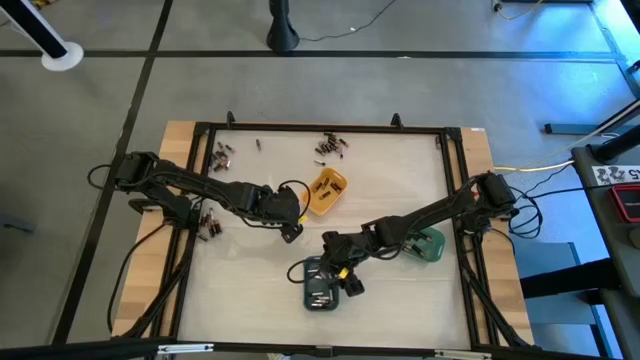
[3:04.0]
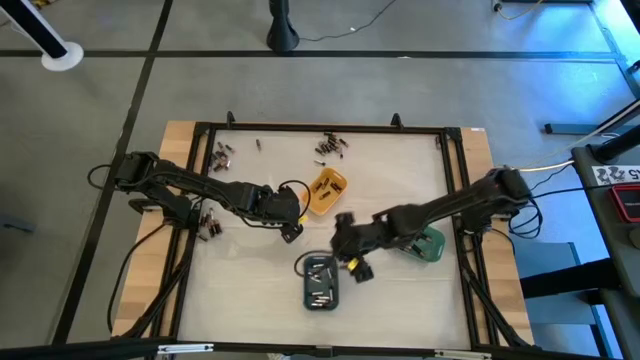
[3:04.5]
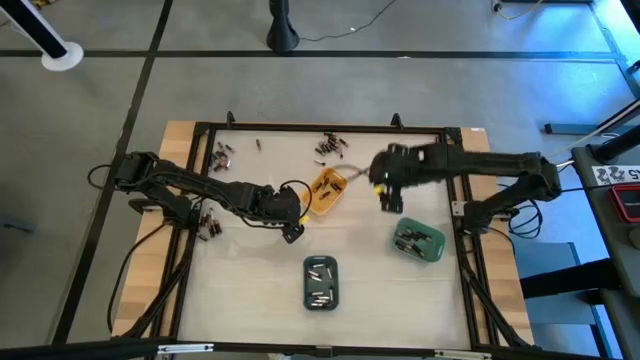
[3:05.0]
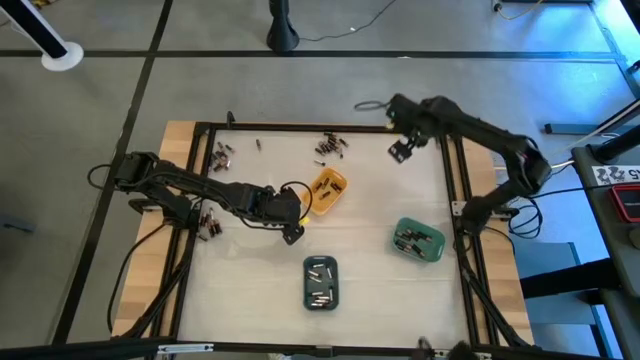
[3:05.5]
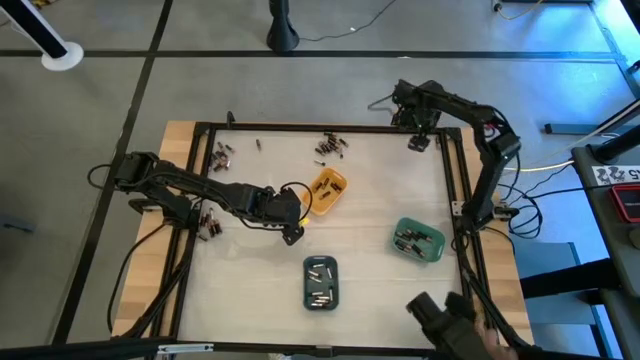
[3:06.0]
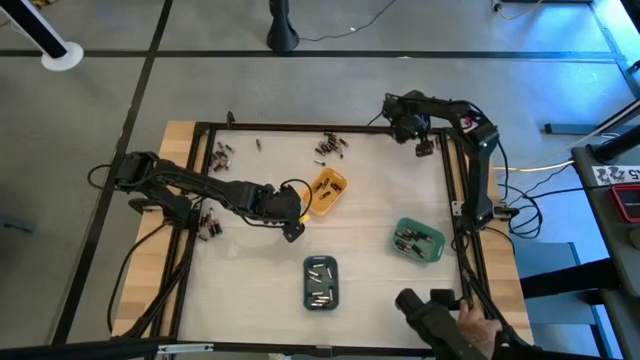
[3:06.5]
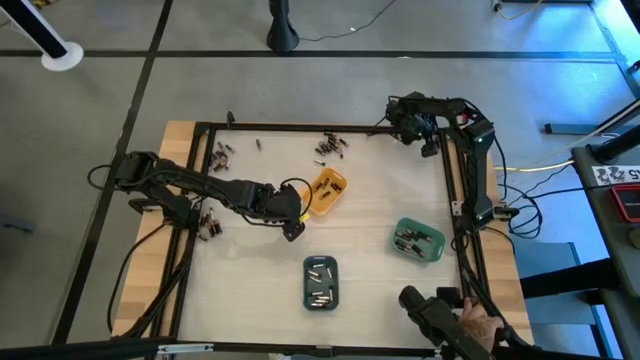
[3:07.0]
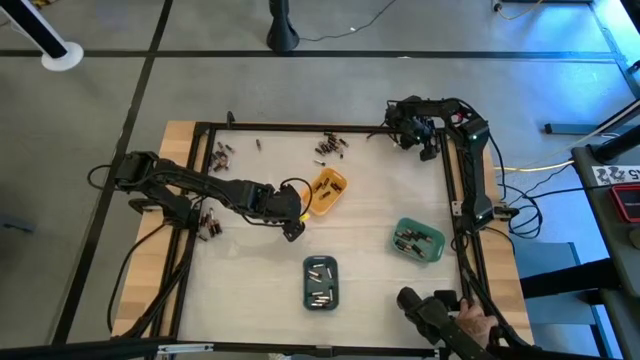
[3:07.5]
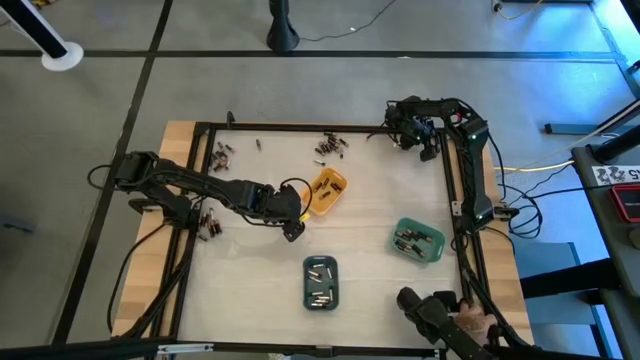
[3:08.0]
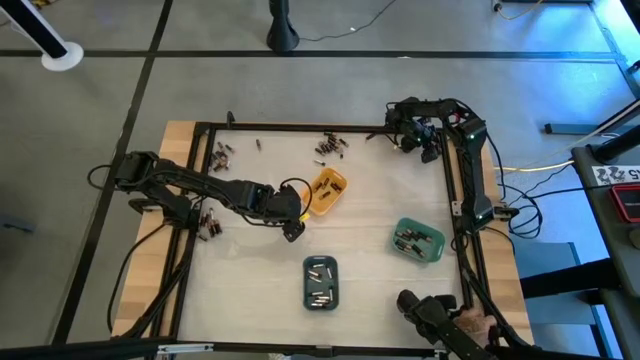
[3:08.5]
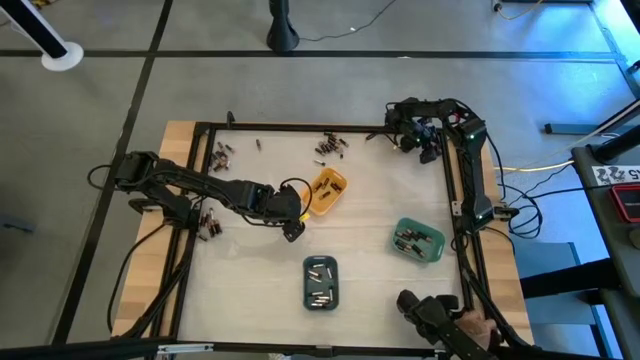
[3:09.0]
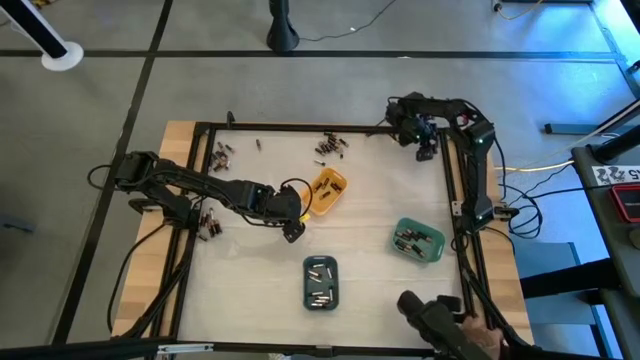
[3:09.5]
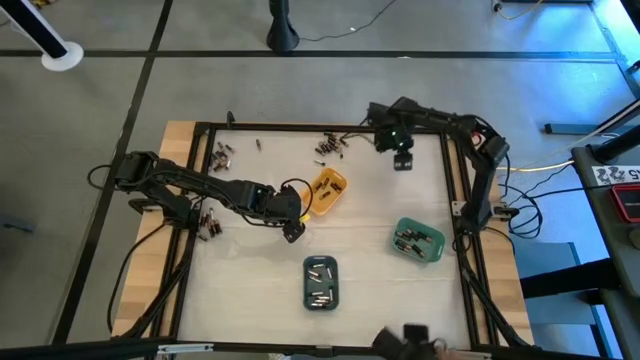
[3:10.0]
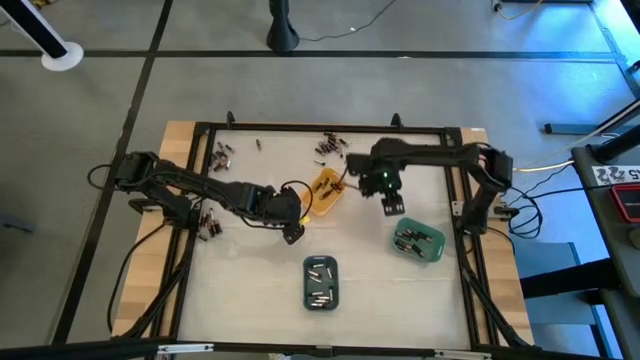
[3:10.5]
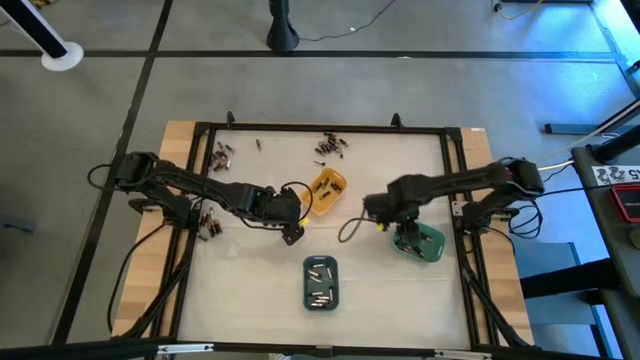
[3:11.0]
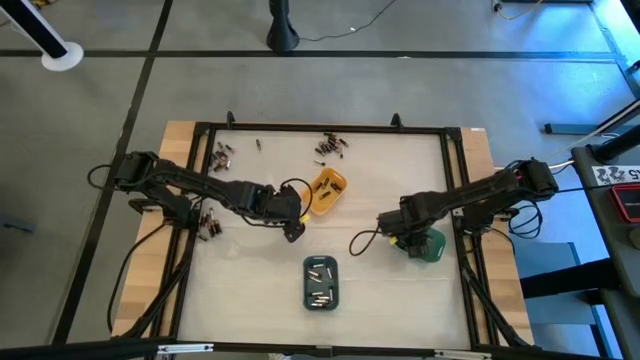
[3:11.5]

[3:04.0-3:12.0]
Task: Sort batteries
Put the black battery into the green bin

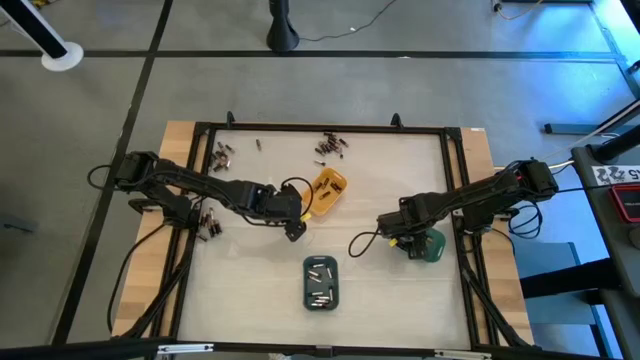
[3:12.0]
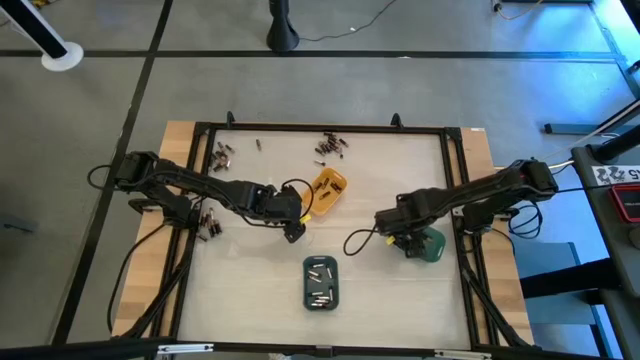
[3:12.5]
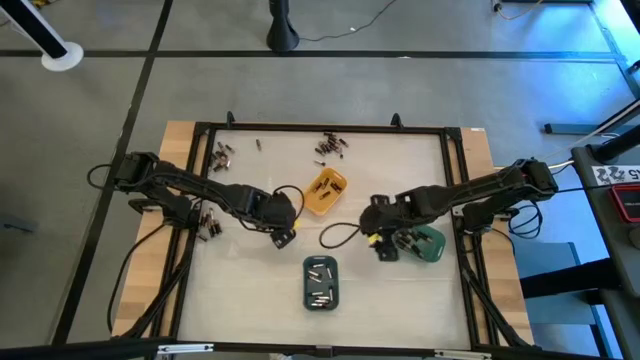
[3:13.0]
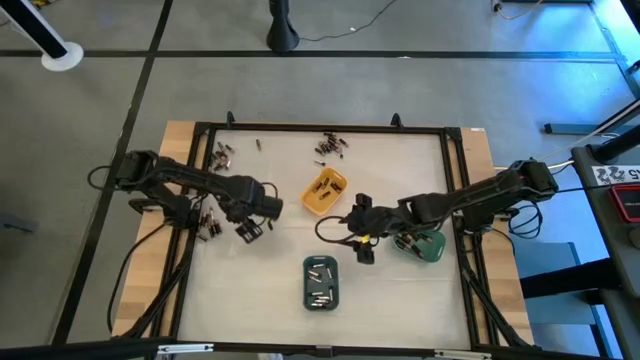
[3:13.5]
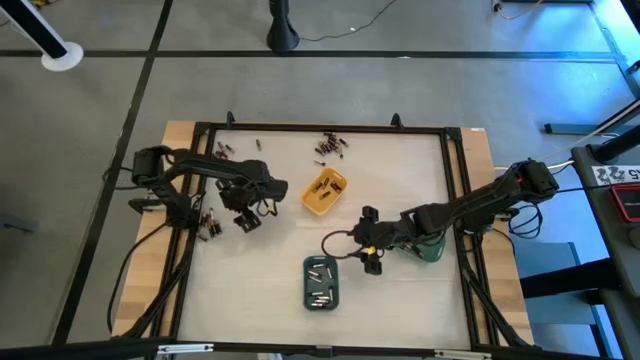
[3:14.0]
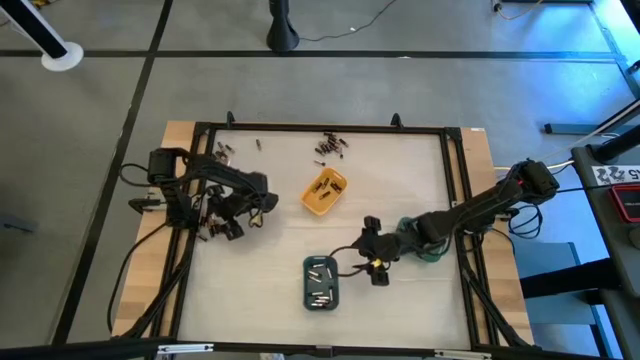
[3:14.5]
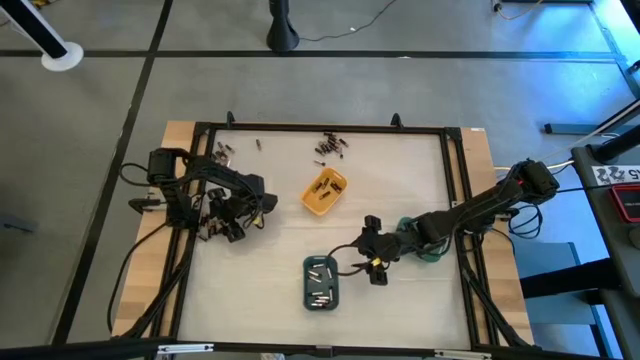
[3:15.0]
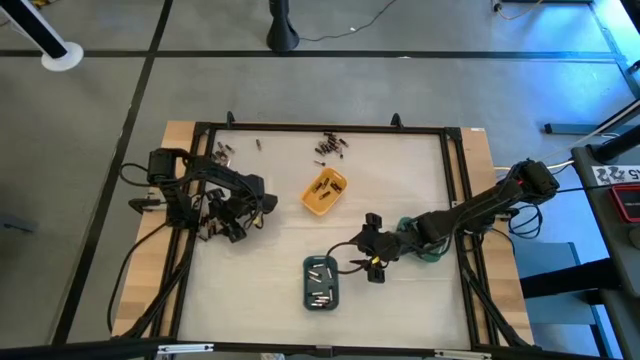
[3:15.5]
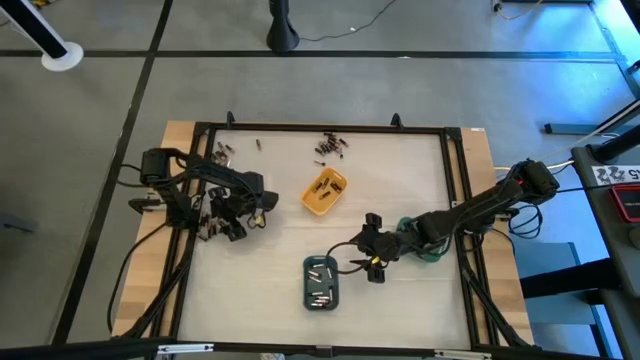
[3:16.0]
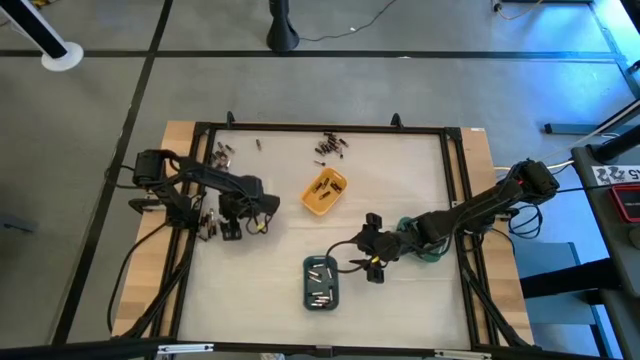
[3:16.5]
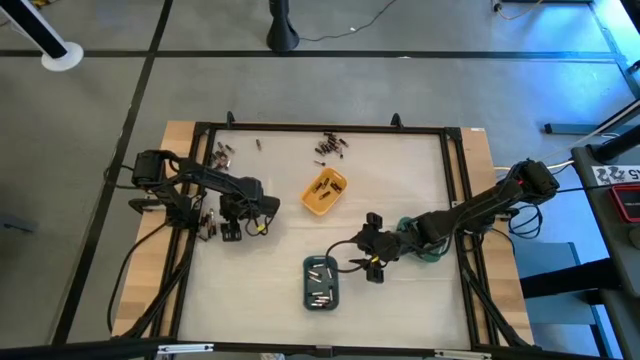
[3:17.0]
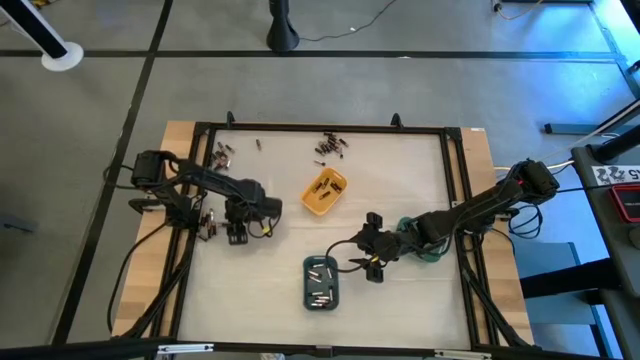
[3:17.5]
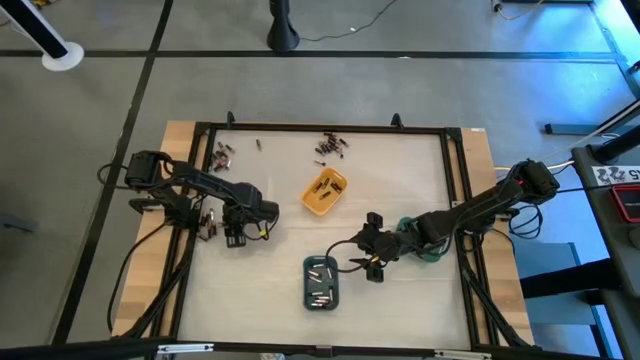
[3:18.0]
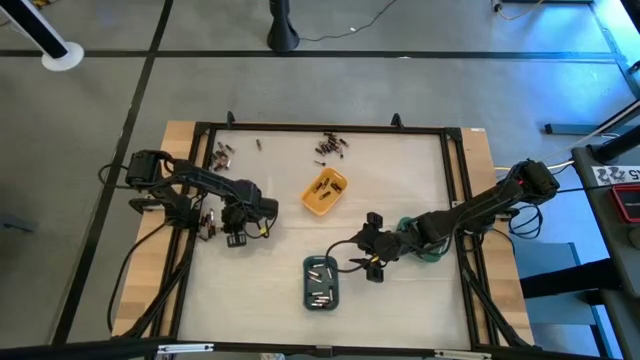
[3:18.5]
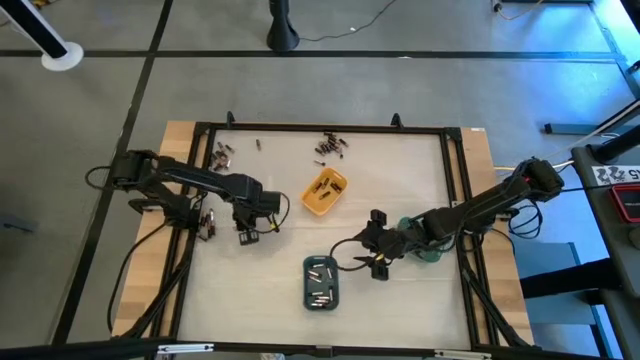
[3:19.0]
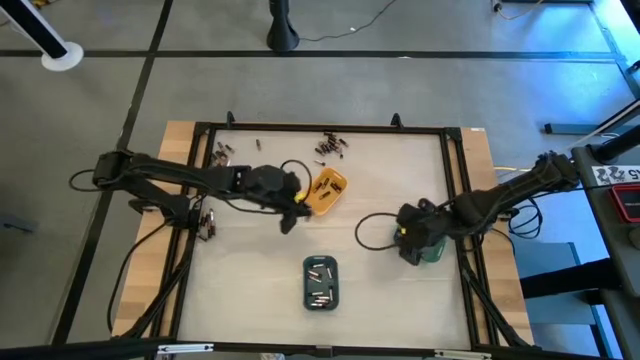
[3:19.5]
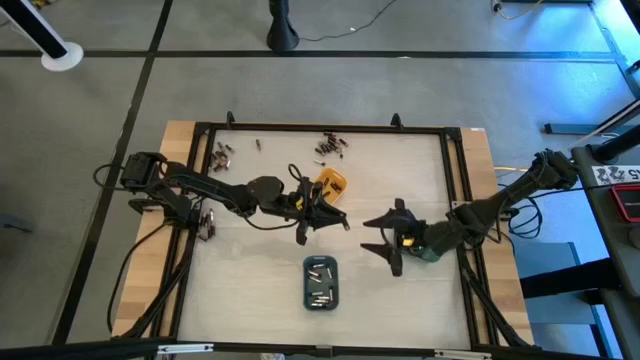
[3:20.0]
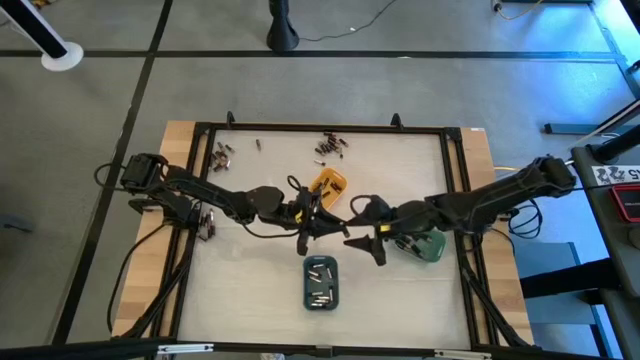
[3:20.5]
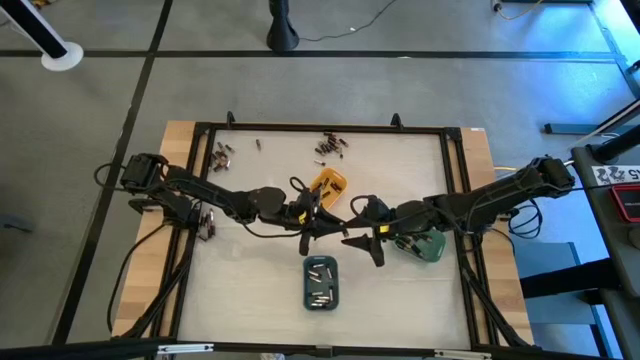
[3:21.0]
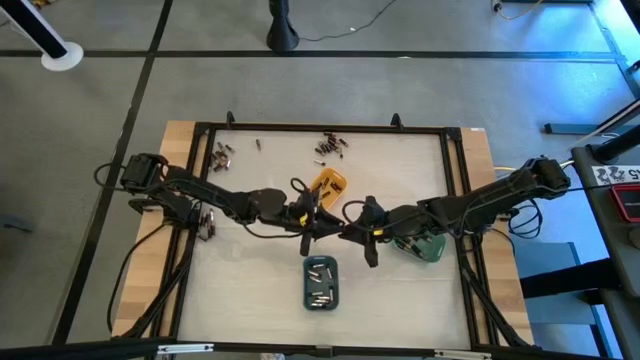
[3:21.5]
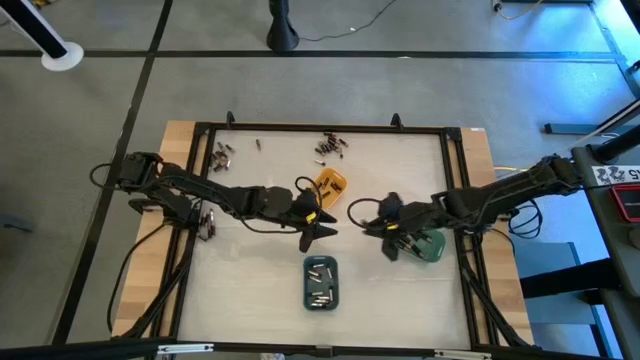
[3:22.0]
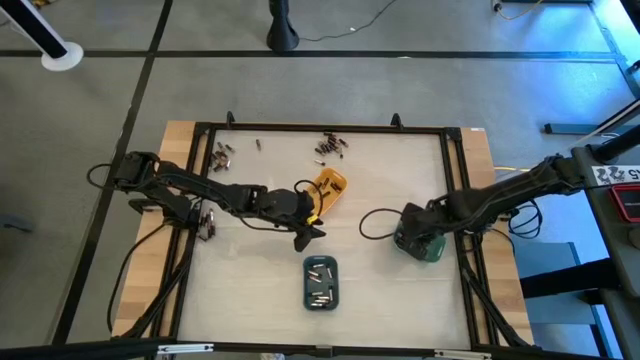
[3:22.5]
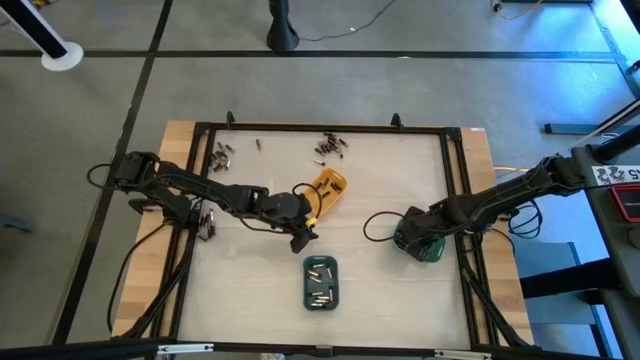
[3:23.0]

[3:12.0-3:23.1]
Put the black battery into the green bin

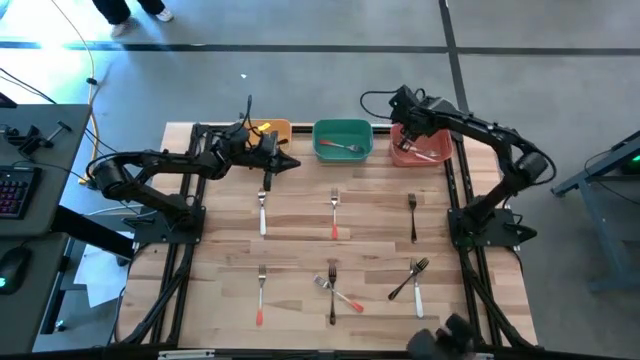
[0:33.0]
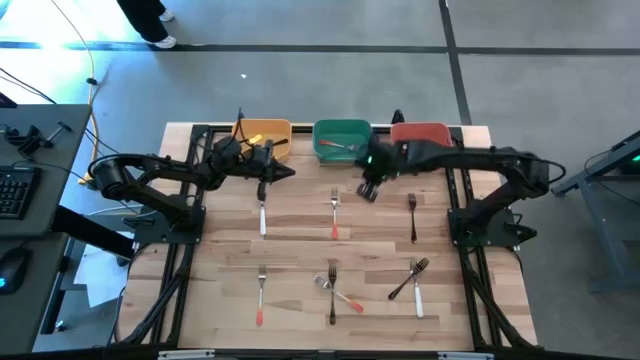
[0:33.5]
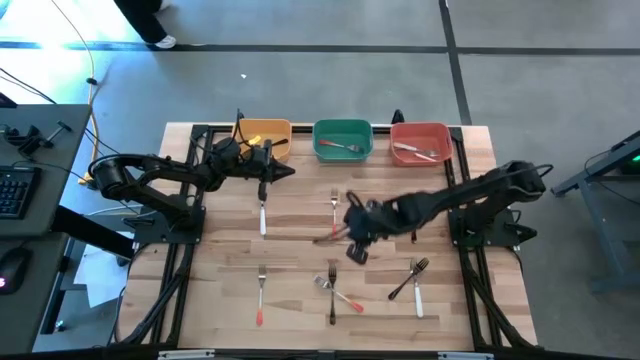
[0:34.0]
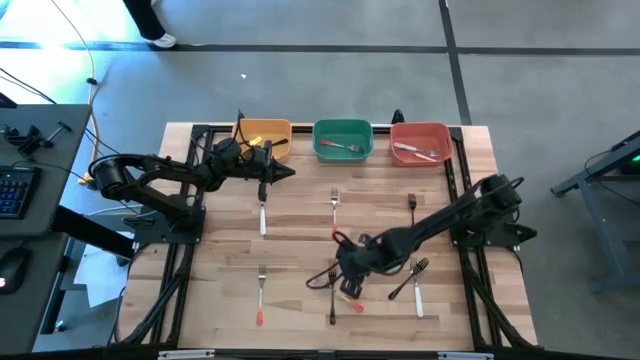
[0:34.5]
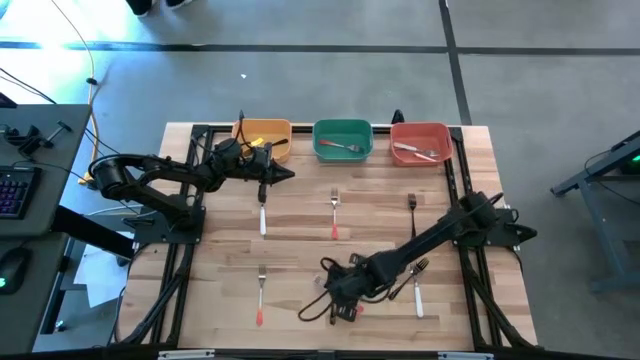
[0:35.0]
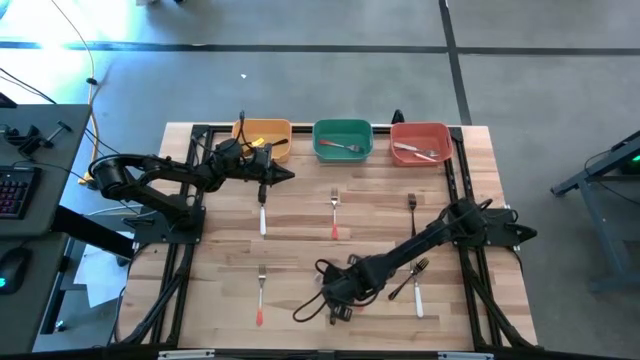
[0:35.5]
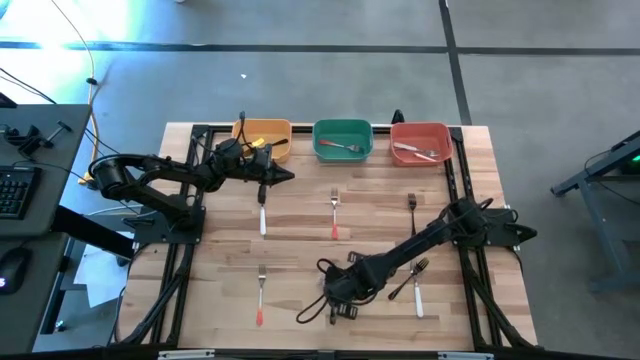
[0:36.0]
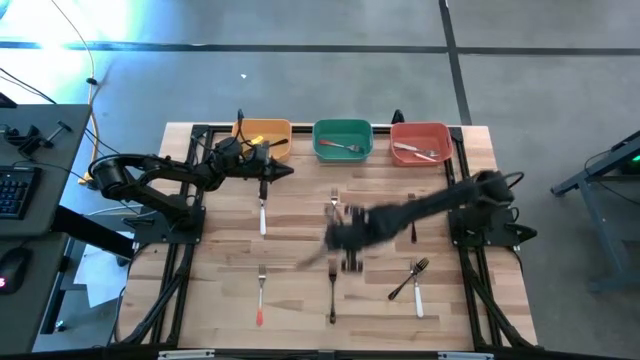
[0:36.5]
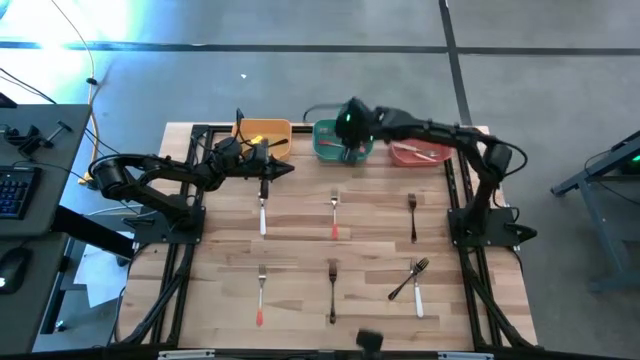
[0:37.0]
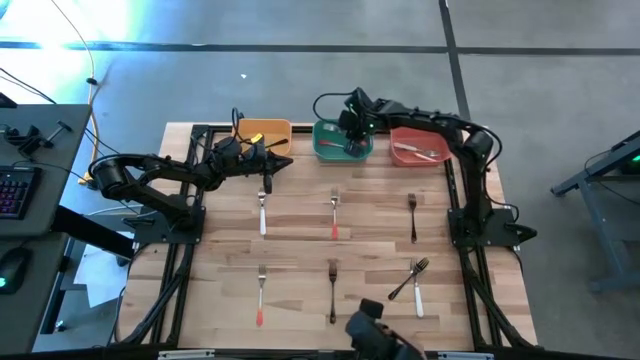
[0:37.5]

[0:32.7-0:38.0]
Task: Sort silverware by color (type)
Put the bottom right orange fork into the blue bin
